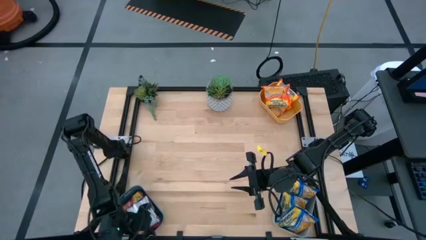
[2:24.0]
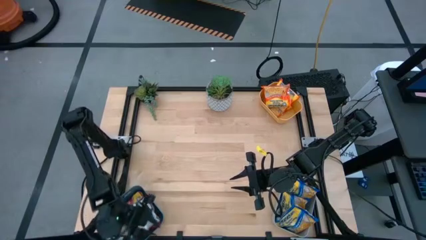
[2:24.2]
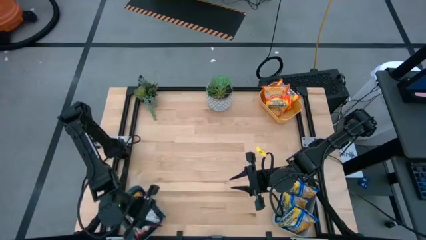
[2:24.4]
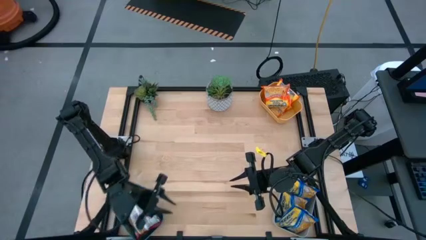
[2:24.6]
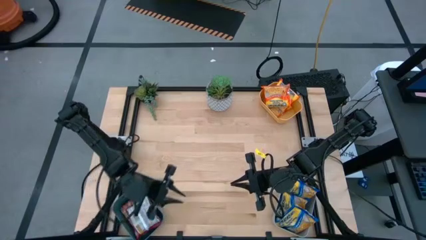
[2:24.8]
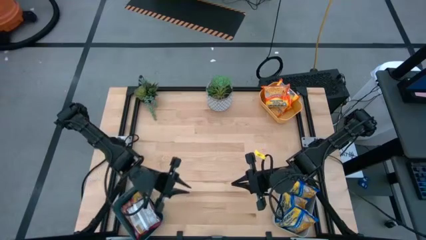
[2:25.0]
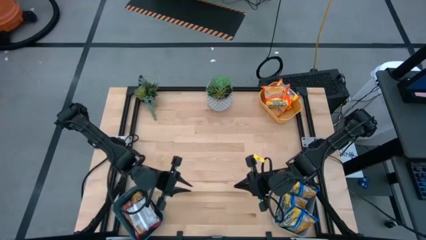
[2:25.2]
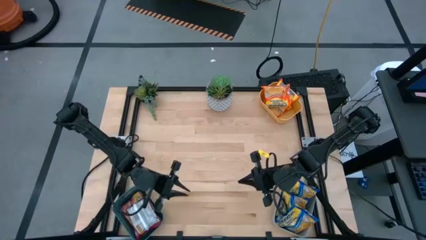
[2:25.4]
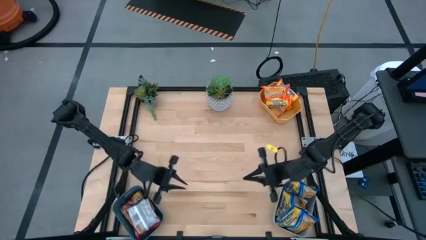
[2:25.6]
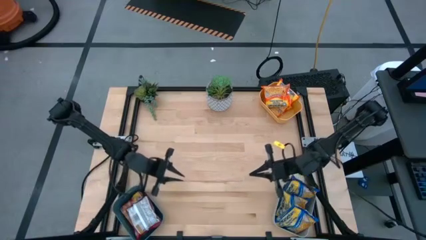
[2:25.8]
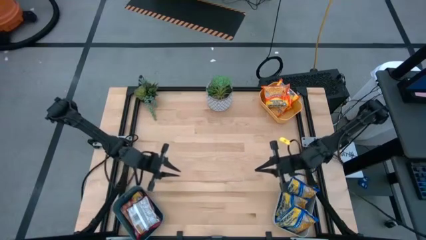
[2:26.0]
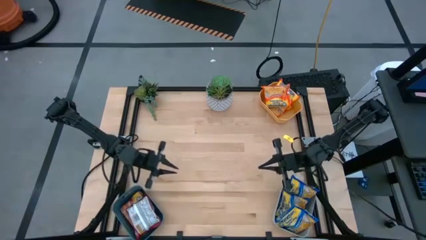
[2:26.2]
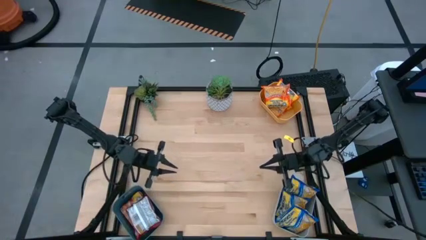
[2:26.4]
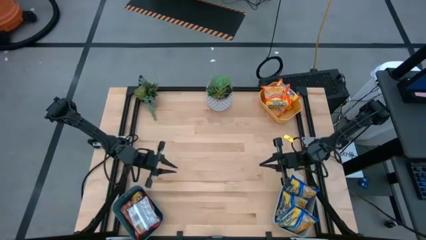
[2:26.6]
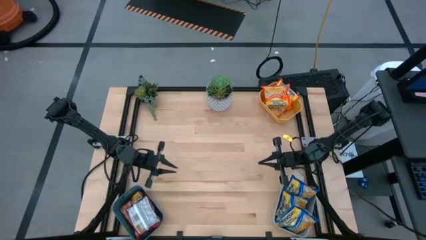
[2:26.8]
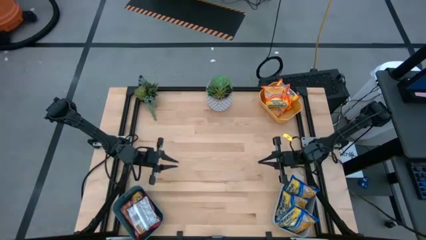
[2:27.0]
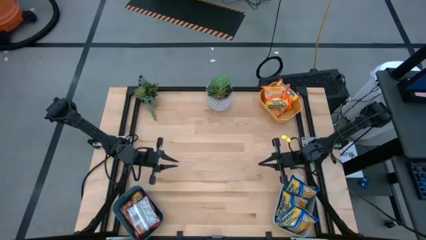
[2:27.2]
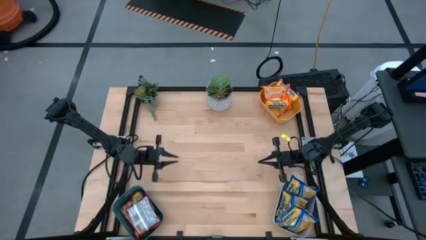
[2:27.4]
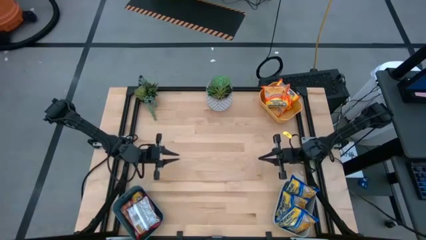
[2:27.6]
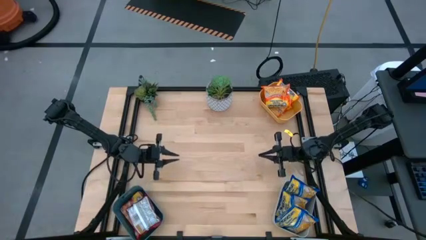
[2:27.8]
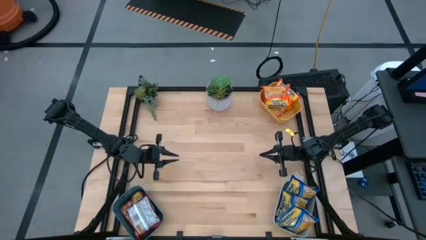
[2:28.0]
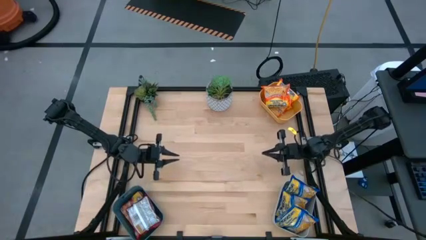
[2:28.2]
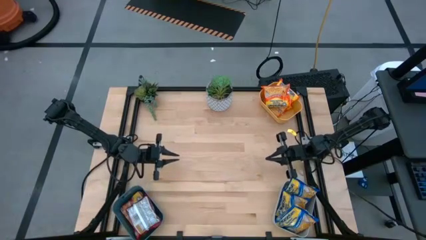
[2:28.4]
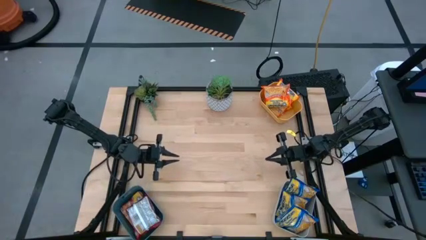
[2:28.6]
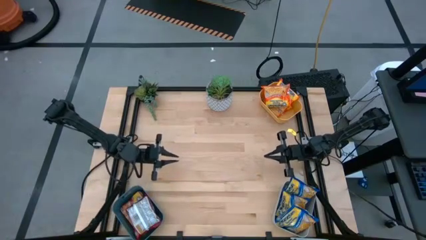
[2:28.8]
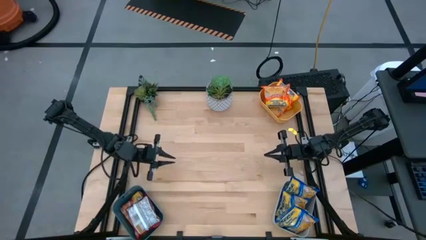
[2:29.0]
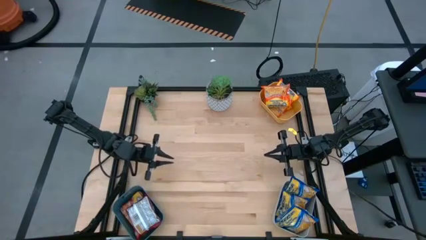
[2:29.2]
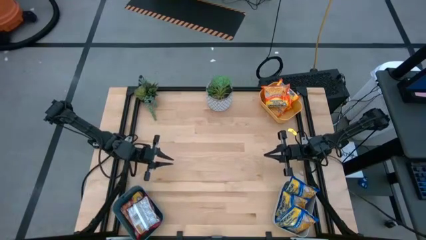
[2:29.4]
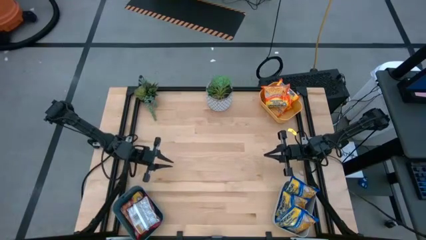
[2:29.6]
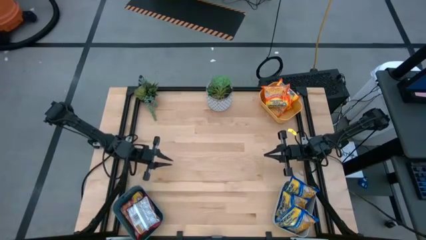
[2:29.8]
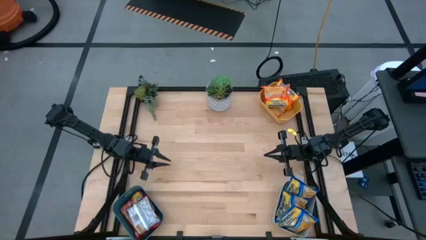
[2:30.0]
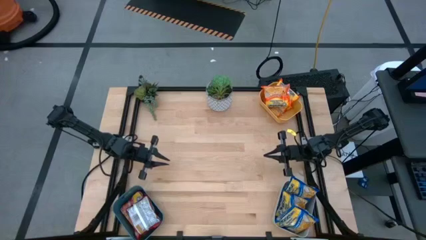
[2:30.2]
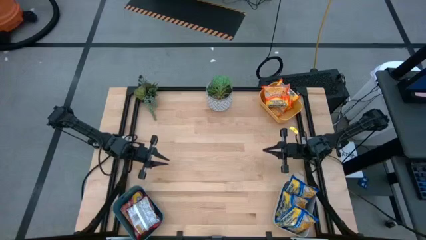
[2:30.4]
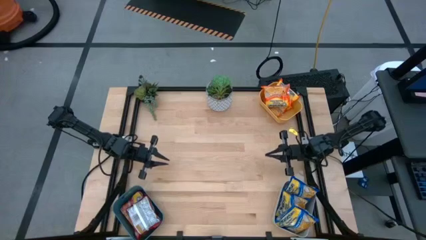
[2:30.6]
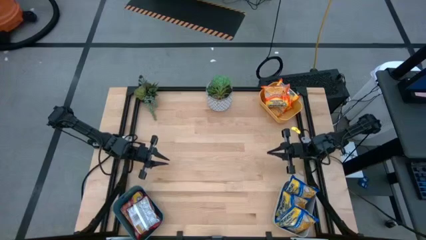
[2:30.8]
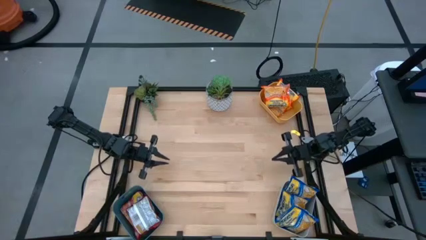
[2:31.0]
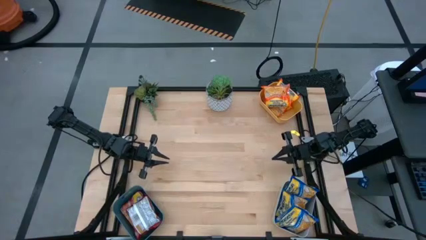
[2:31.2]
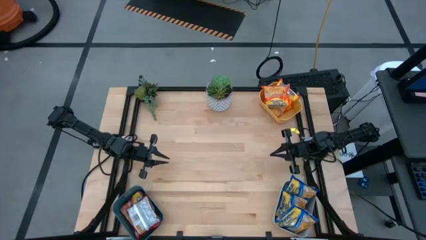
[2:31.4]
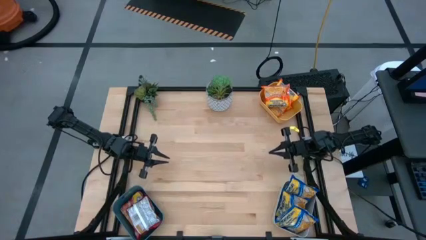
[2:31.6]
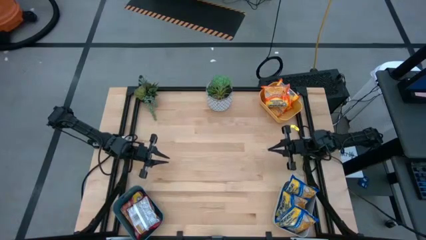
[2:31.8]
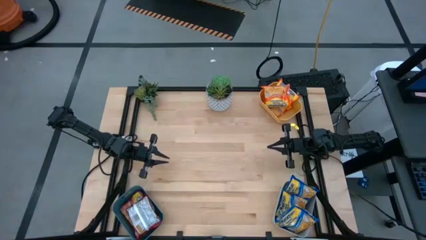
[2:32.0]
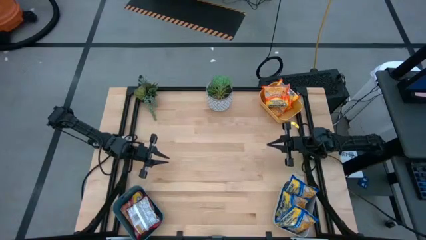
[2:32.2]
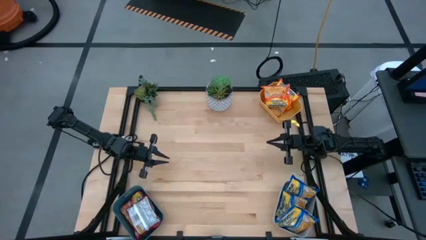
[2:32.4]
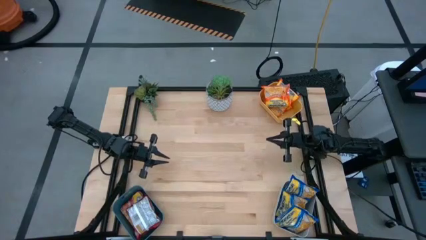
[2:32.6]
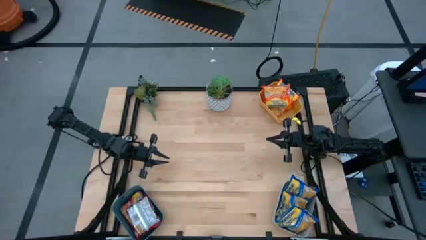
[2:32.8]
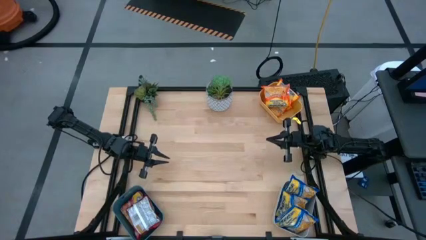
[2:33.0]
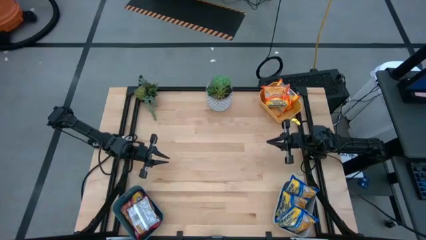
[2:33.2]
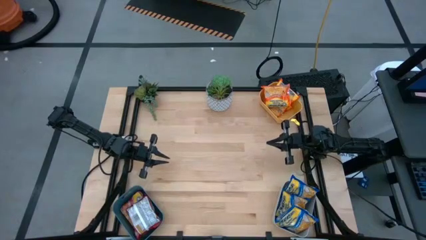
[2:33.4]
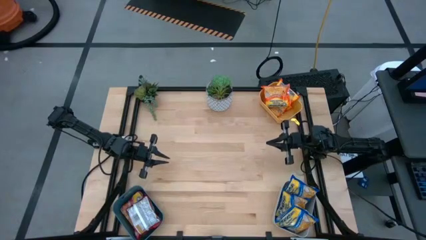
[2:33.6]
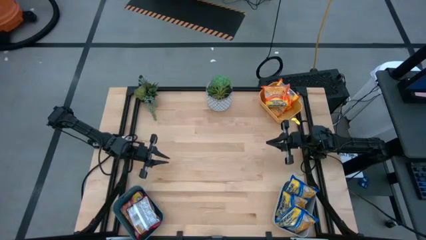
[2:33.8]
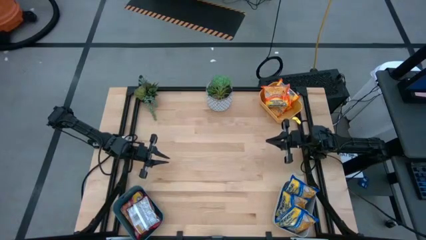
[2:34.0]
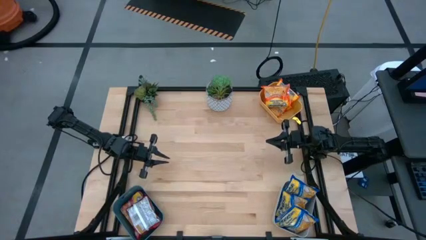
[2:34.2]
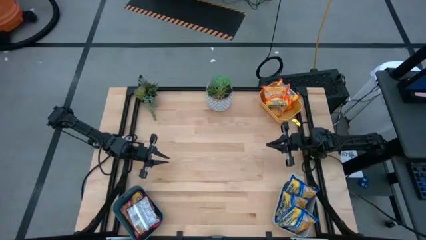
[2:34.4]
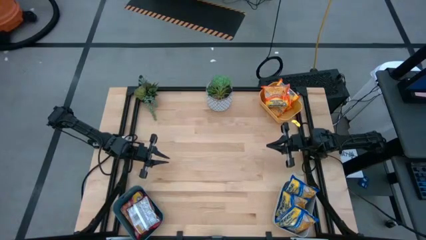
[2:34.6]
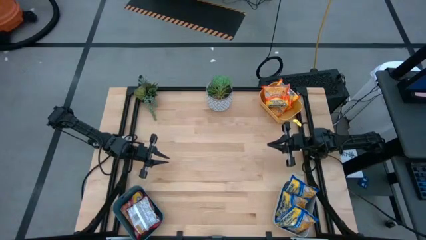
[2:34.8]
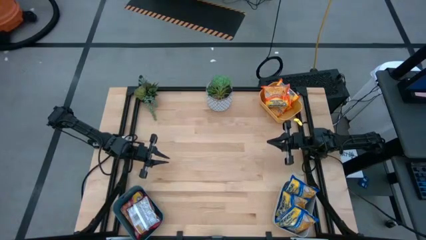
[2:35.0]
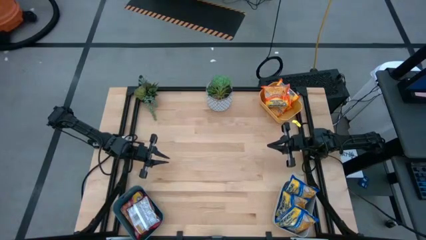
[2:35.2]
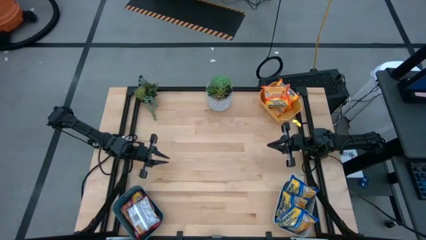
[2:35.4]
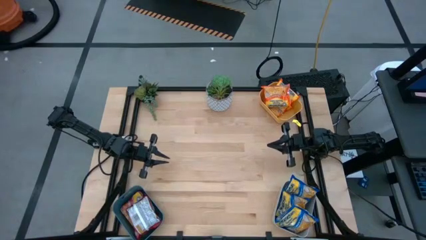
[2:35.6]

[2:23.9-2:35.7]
Task: Sort Maruchan noodles
Return to Home Position

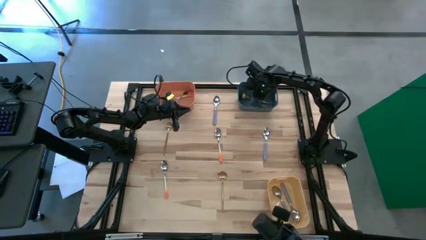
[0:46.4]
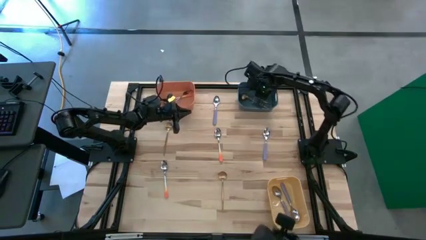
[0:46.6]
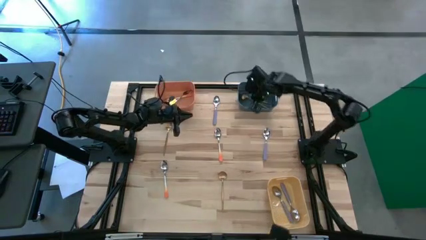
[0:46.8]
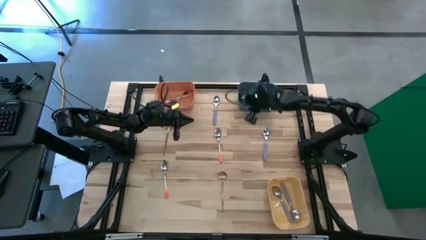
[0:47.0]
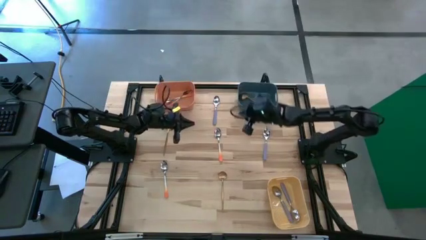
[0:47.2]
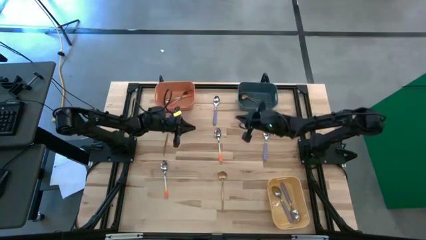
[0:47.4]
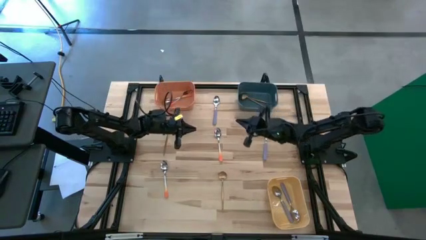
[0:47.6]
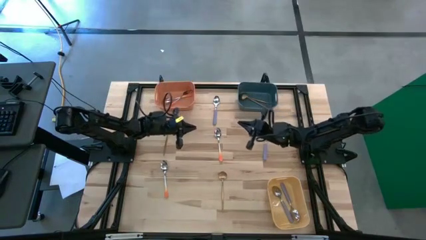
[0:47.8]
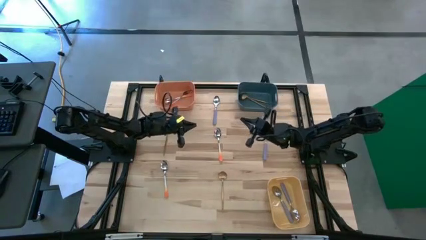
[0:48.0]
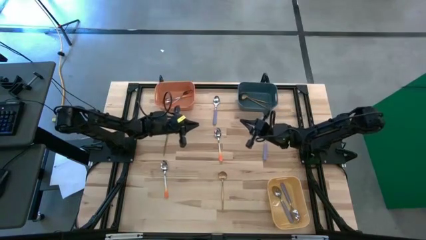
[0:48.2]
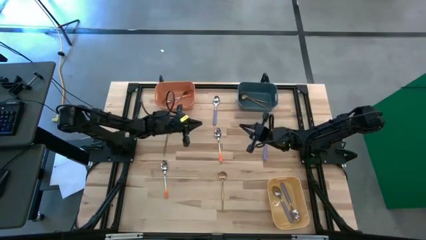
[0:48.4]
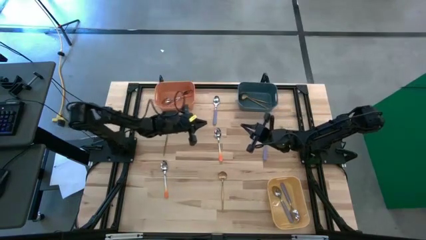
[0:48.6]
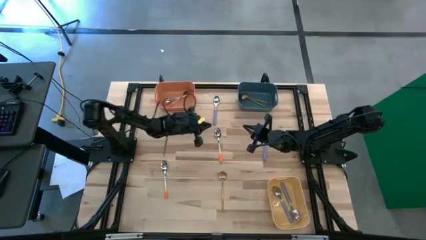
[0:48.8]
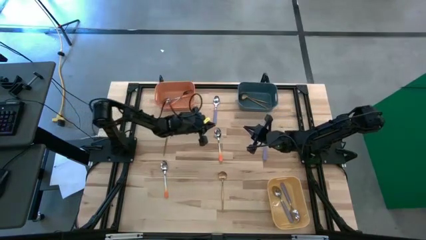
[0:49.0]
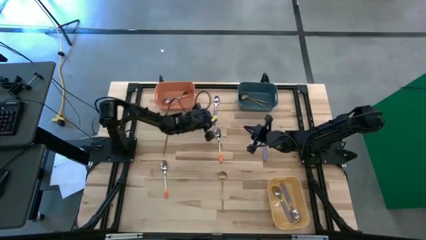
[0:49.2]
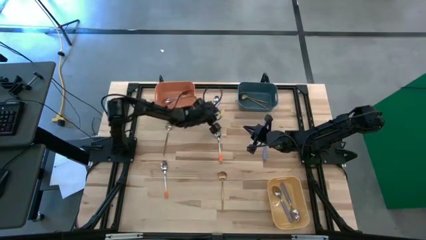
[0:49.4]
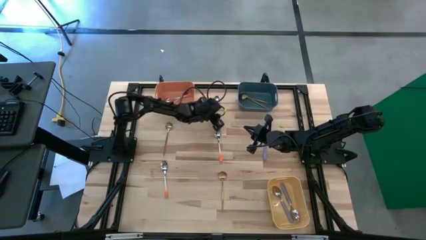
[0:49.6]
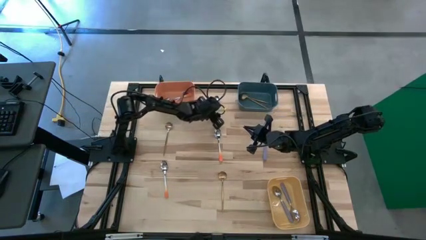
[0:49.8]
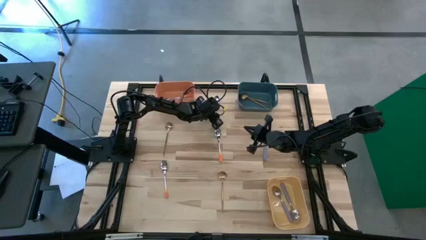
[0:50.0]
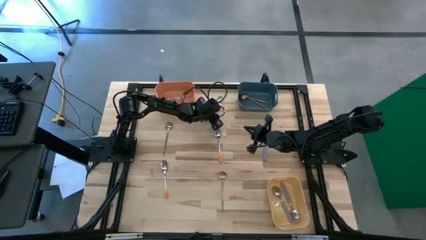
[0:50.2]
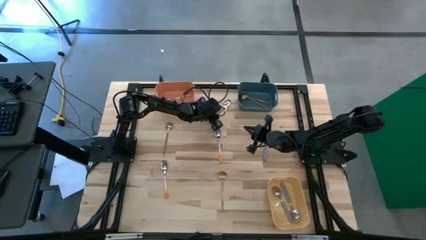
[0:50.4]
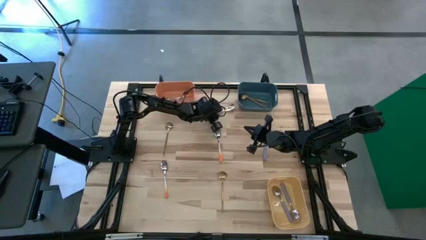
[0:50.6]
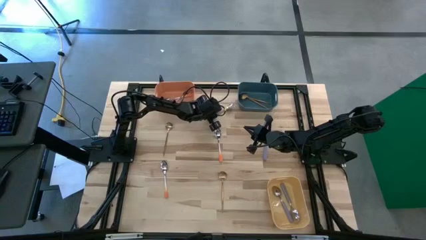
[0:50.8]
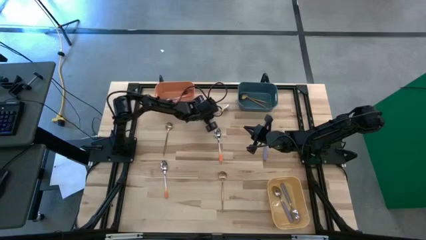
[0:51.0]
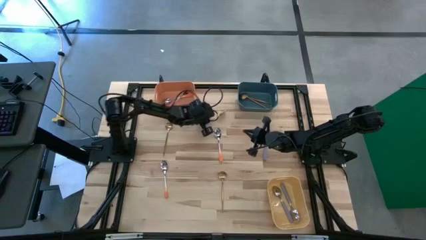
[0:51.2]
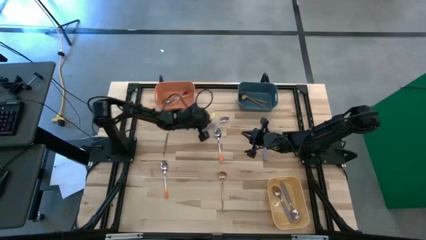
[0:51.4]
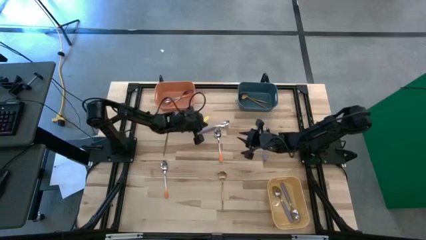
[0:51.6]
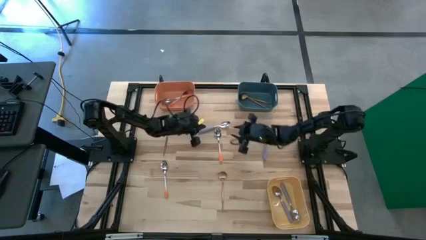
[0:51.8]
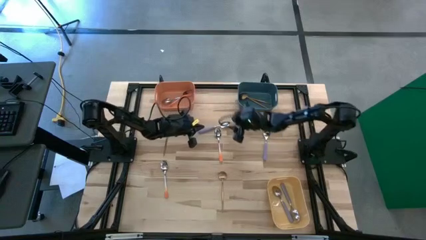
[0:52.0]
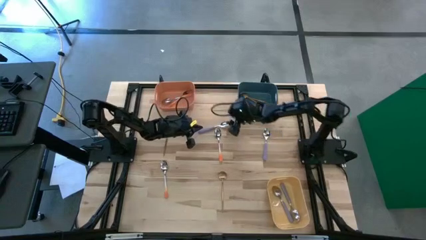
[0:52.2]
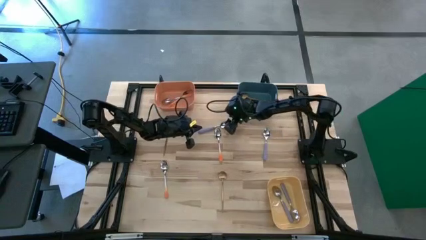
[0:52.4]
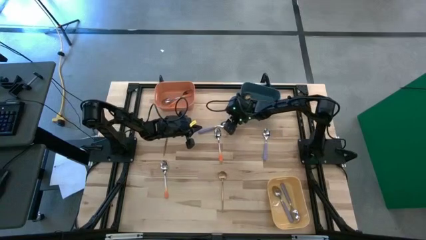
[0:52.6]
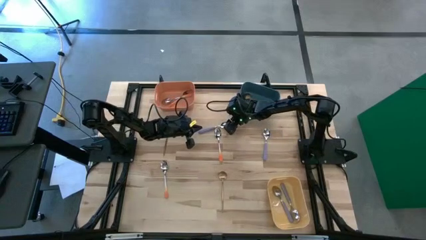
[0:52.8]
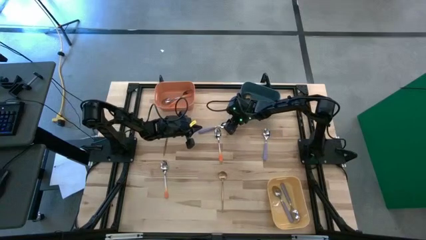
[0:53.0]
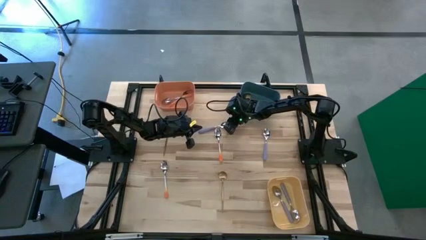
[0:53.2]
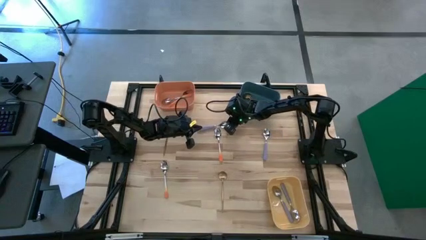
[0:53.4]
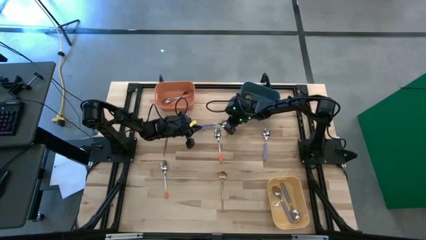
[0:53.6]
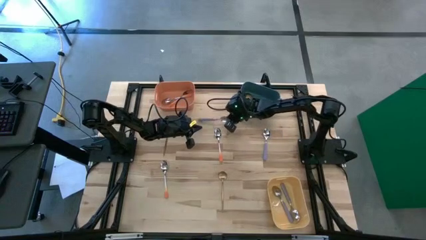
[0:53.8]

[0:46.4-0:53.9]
Task: Sort silverware by color (type)
Put the violet spoon into the yellow bin
